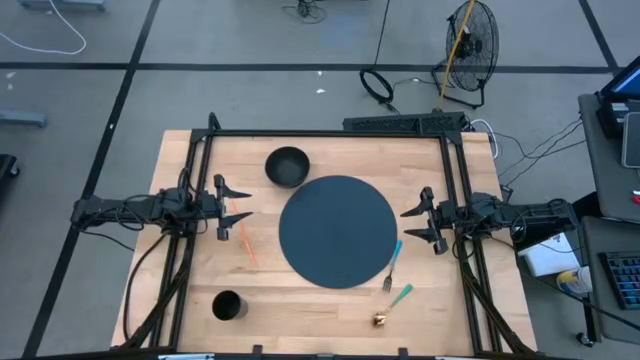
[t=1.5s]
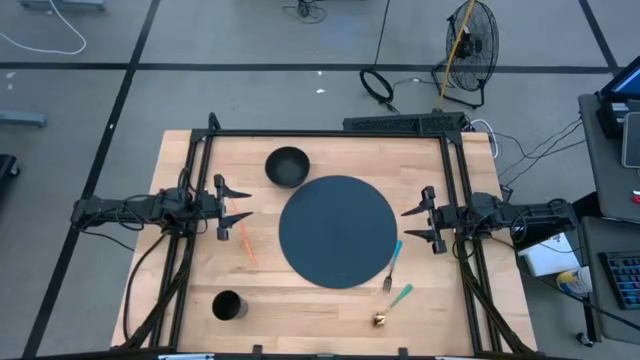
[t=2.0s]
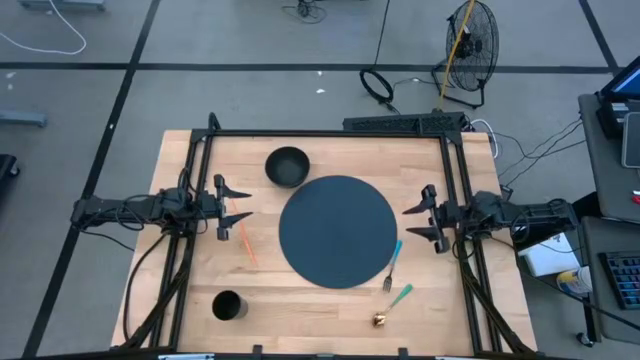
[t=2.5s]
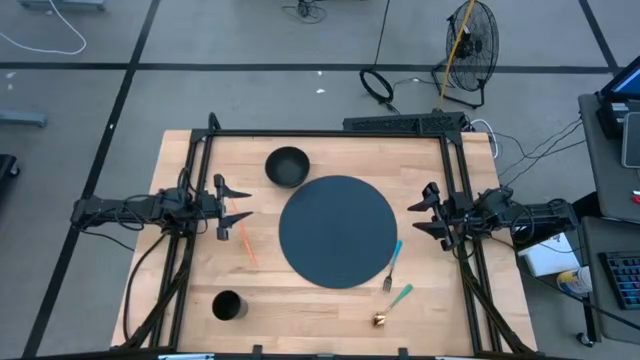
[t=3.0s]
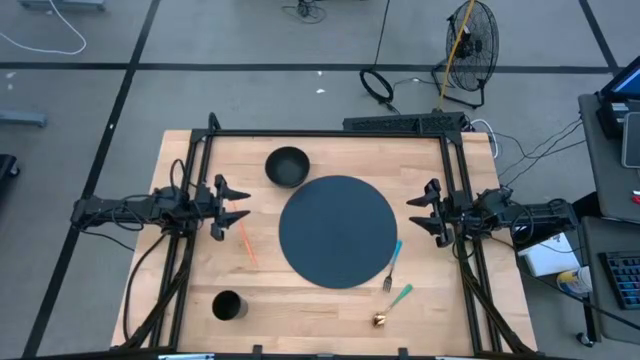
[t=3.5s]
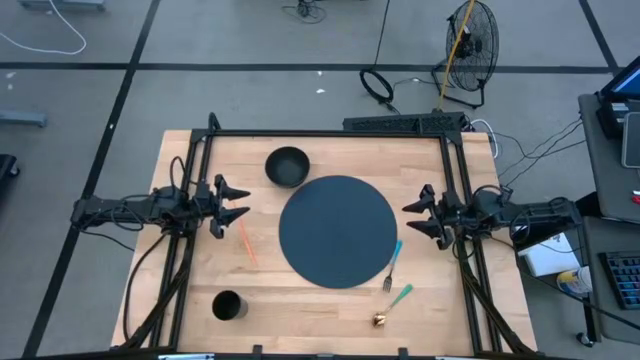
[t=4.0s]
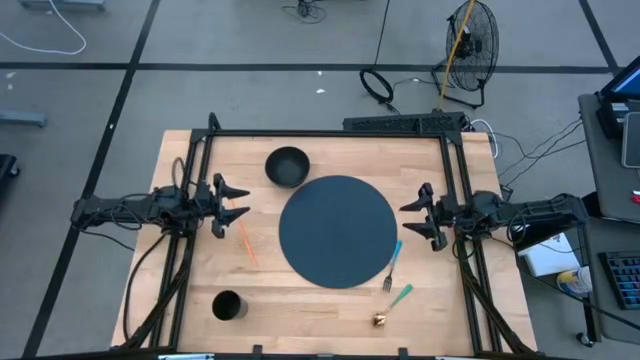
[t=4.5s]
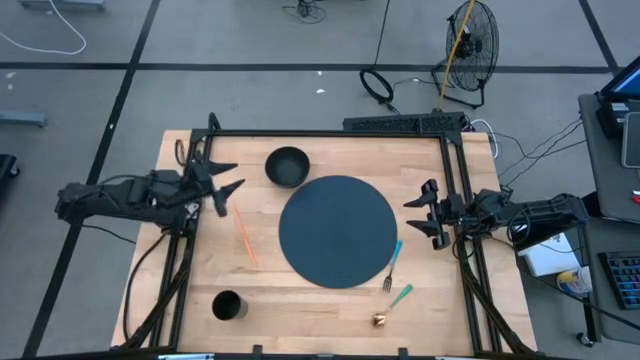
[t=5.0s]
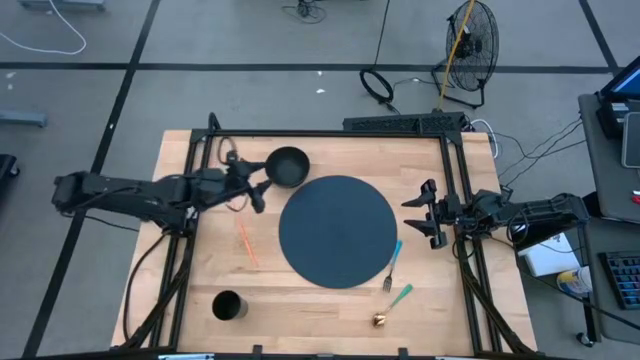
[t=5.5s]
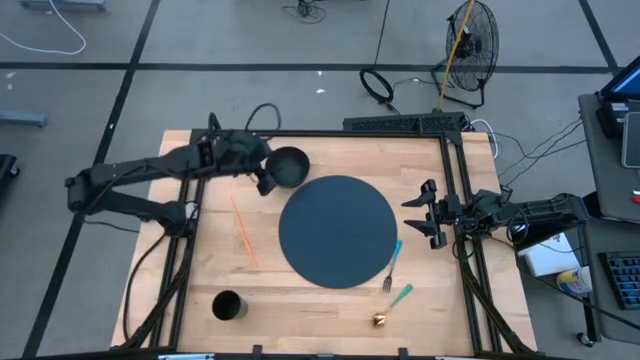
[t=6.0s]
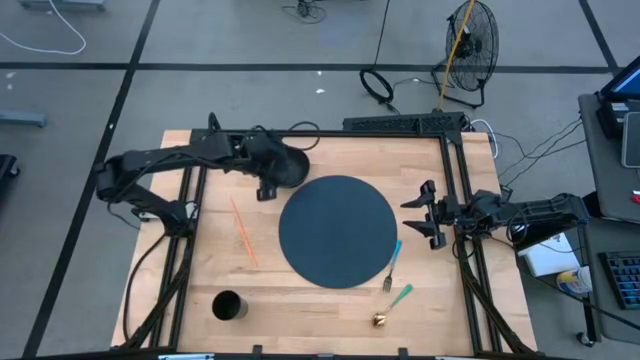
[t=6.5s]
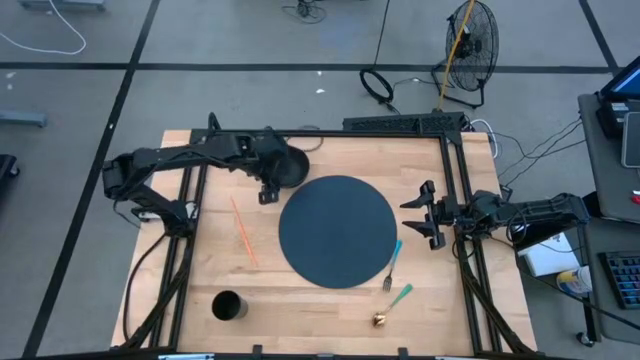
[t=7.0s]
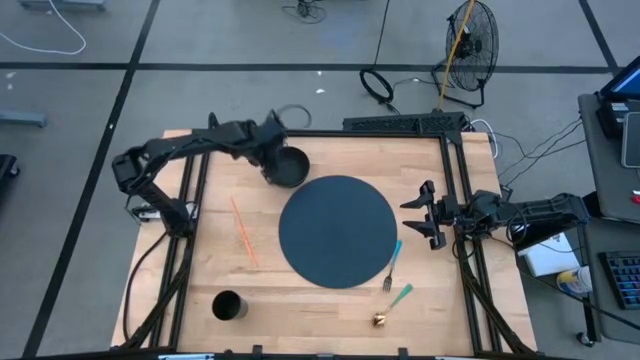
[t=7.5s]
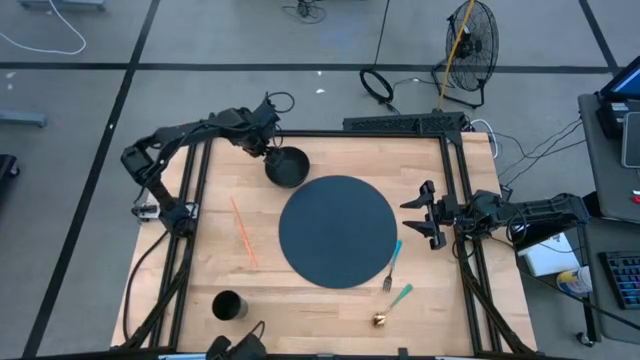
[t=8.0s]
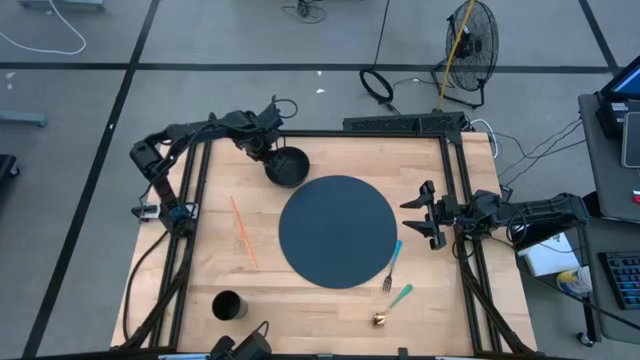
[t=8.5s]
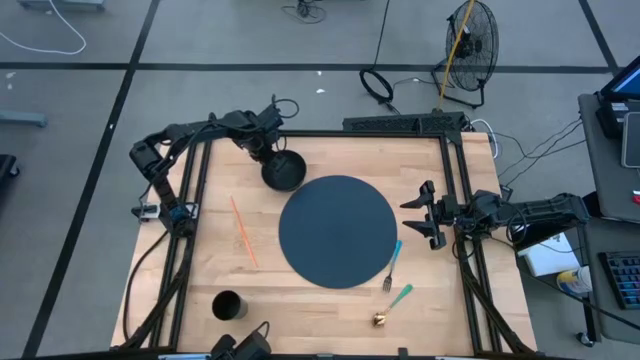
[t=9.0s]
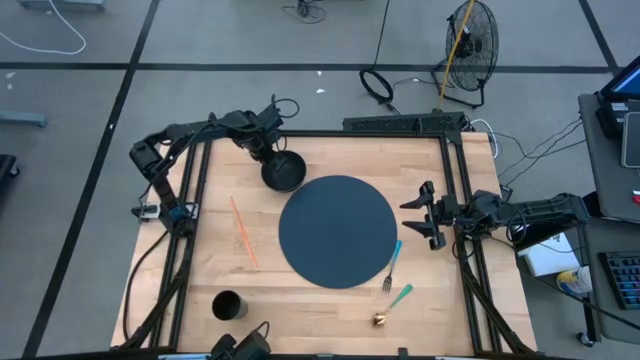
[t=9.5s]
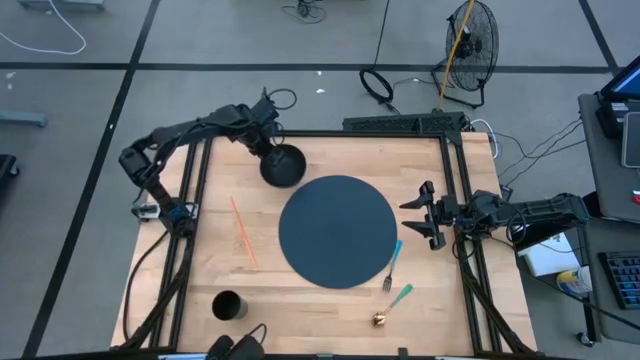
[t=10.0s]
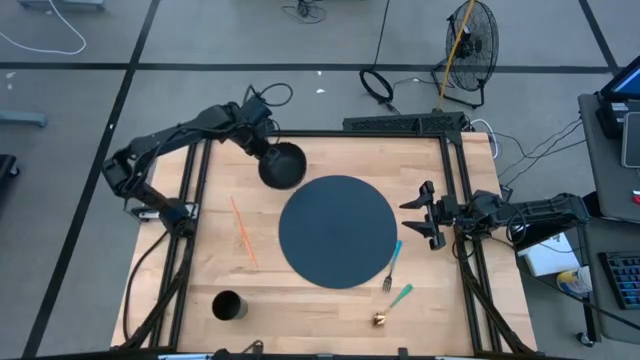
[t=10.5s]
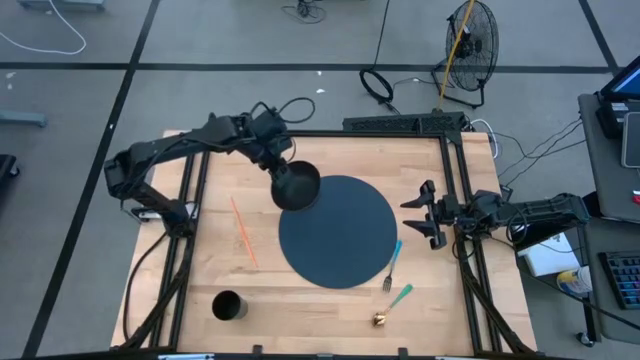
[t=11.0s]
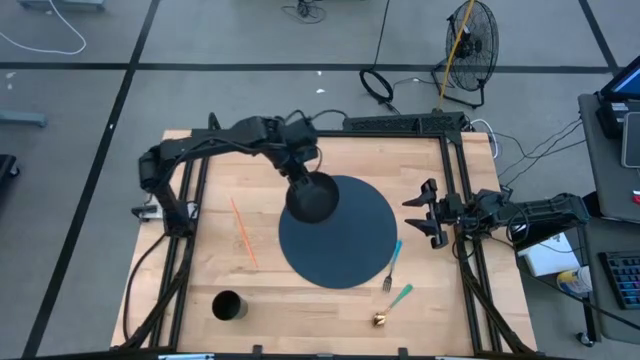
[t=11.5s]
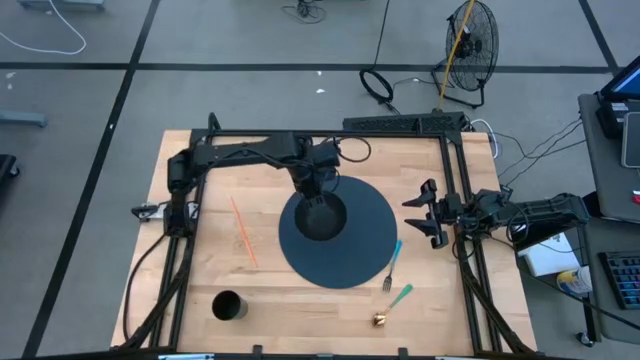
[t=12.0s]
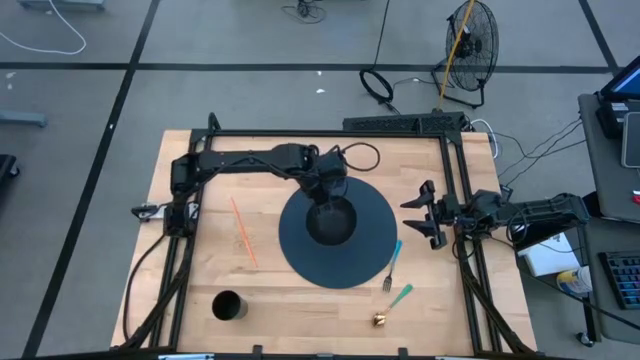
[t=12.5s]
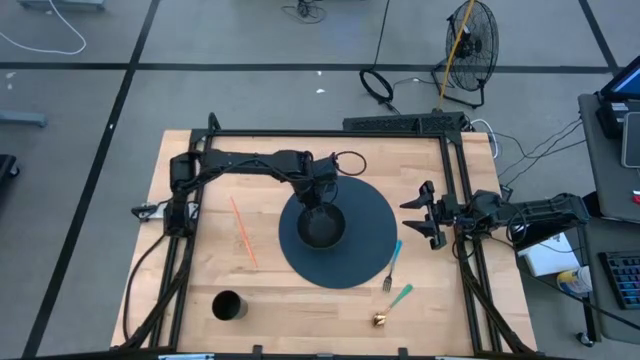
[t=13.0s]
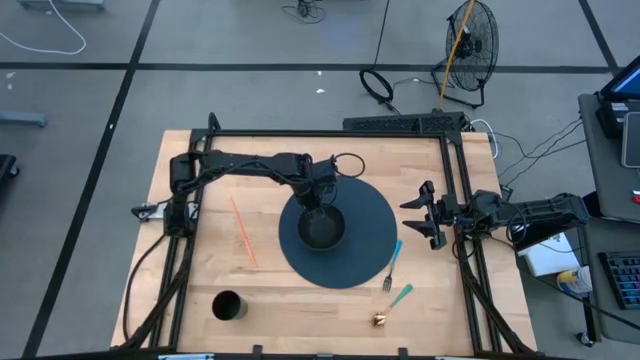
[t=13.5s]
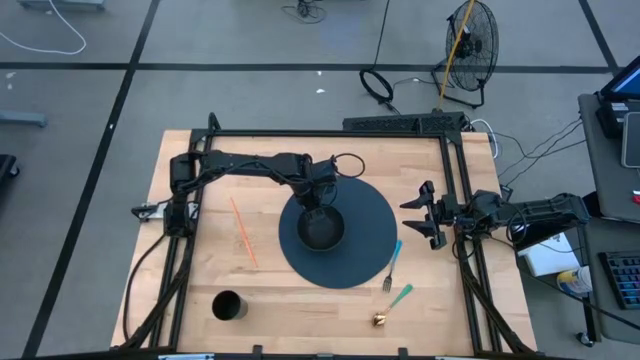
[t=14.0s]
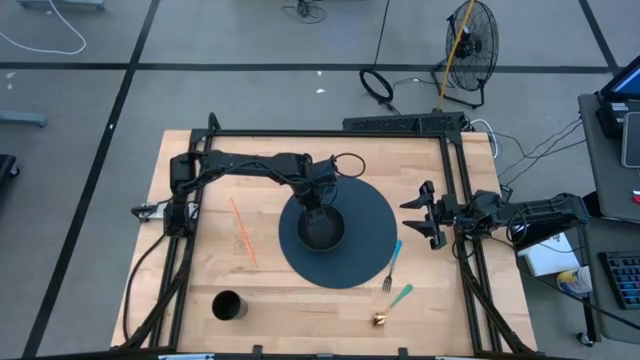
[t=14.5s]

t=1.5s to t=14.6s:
Task: Pick & Place Utensil
Put the black bowl on the blue table placemat

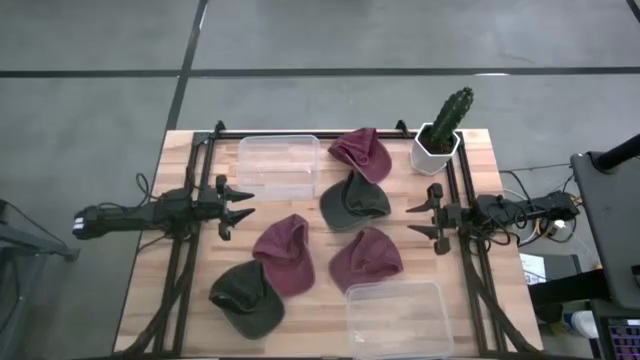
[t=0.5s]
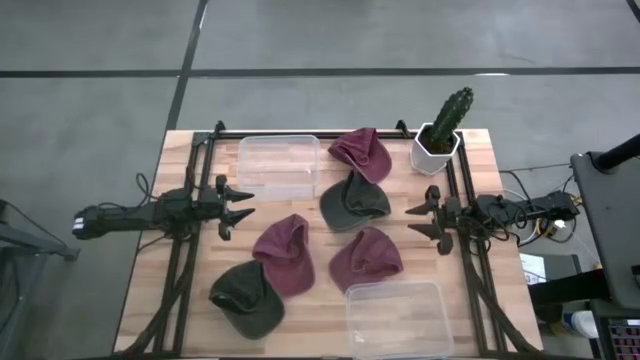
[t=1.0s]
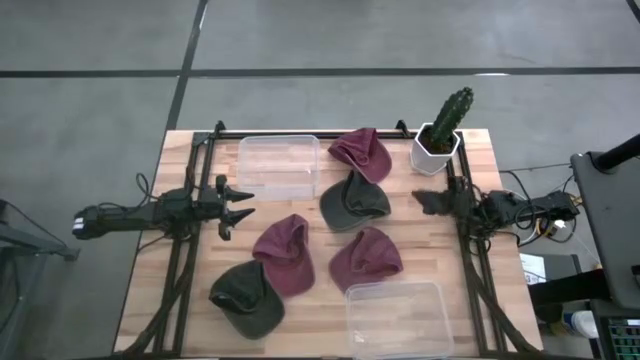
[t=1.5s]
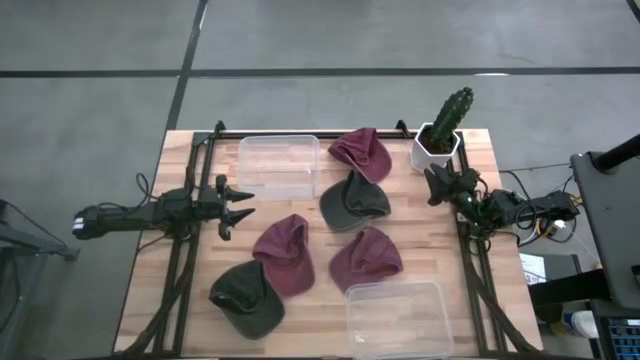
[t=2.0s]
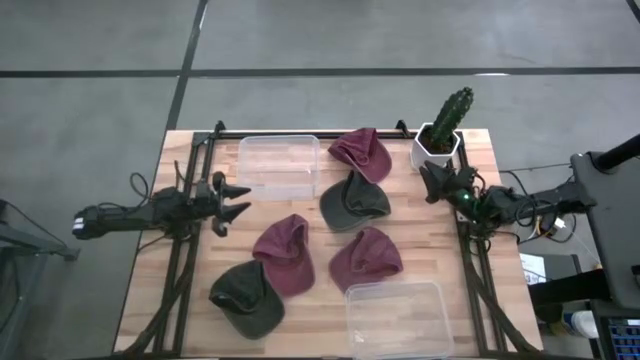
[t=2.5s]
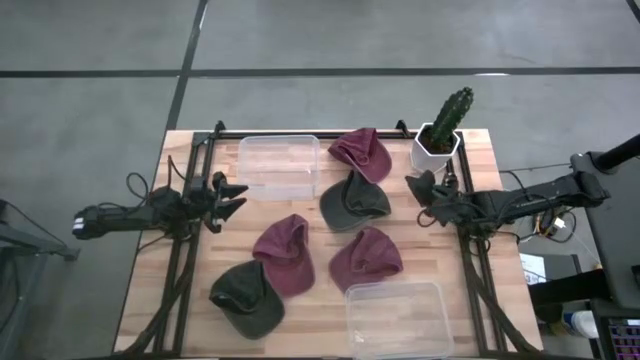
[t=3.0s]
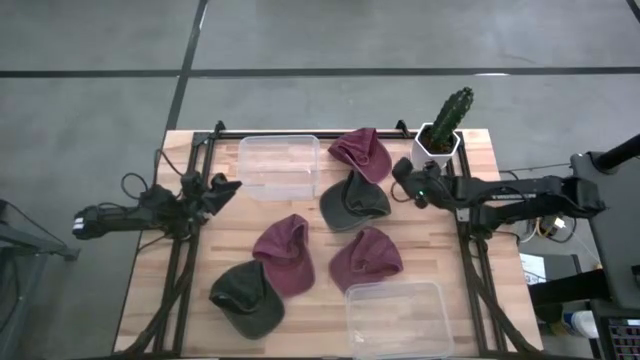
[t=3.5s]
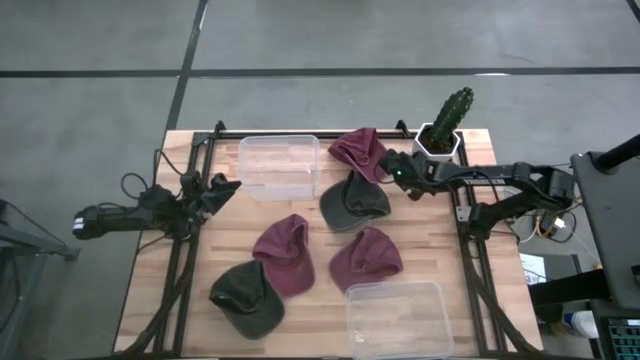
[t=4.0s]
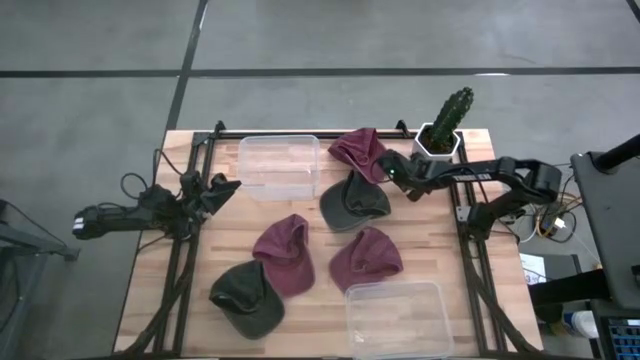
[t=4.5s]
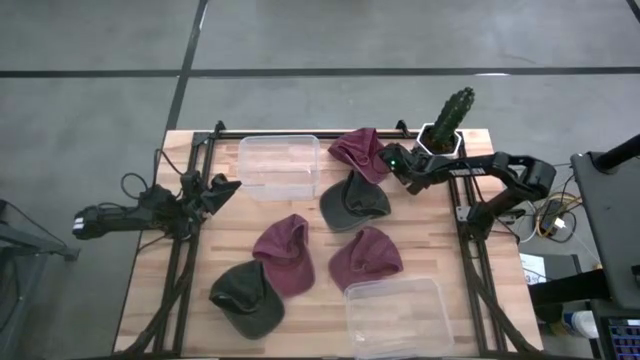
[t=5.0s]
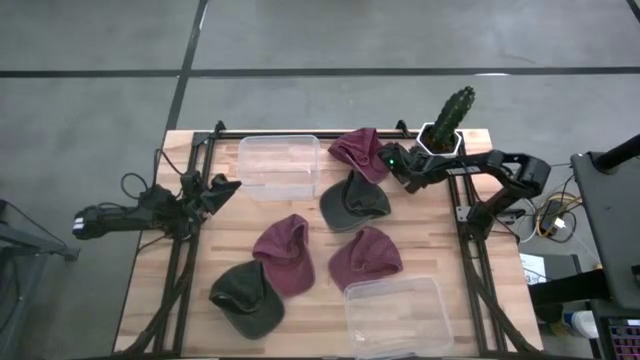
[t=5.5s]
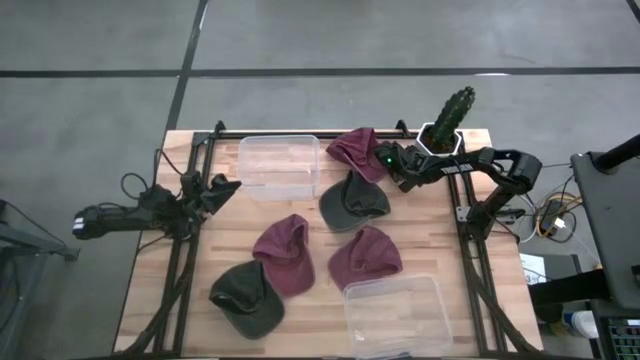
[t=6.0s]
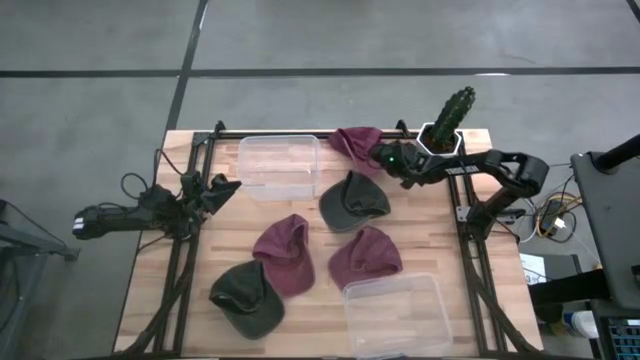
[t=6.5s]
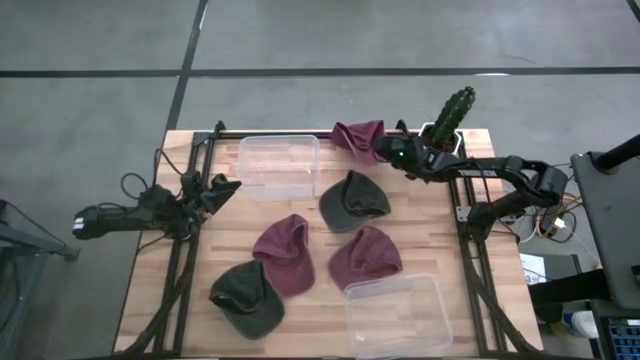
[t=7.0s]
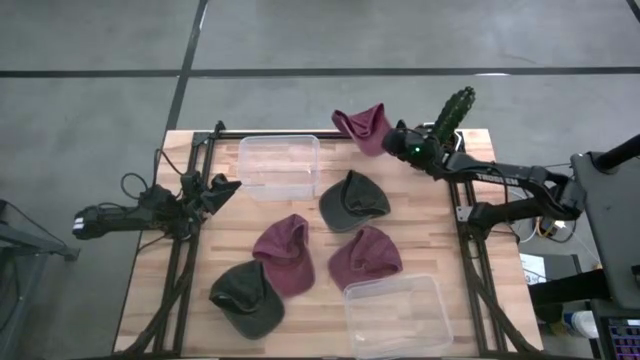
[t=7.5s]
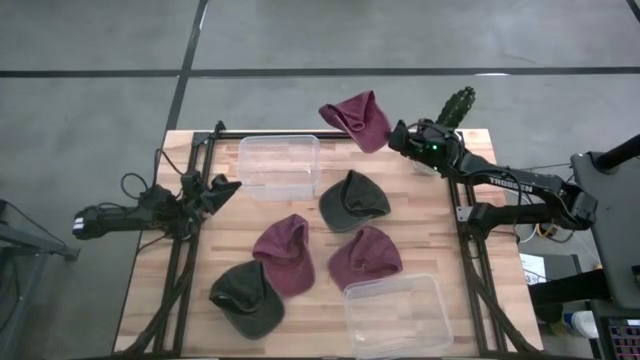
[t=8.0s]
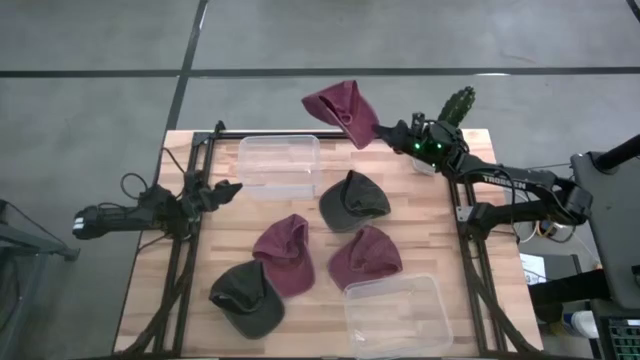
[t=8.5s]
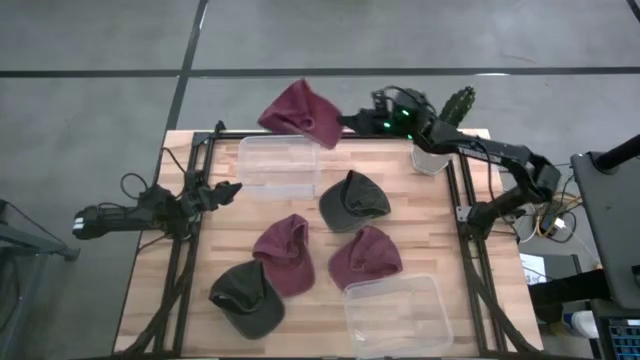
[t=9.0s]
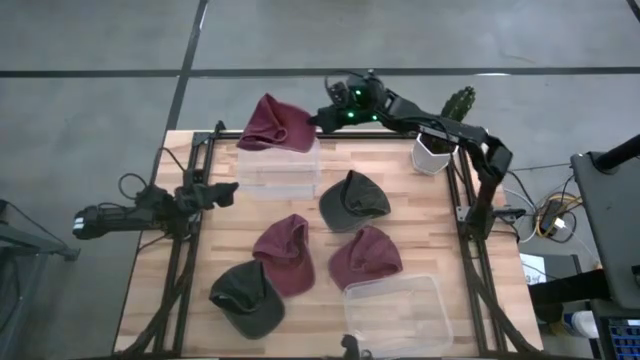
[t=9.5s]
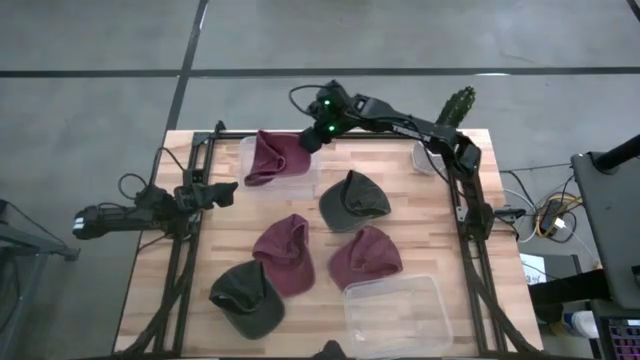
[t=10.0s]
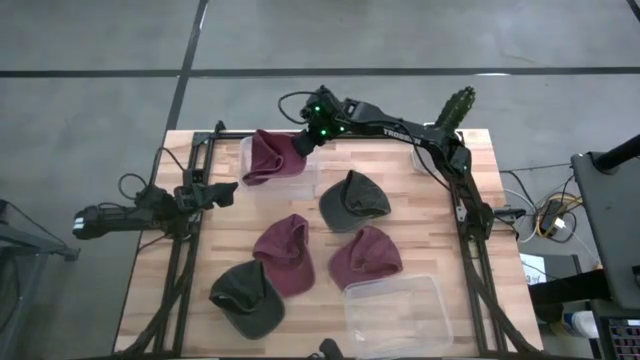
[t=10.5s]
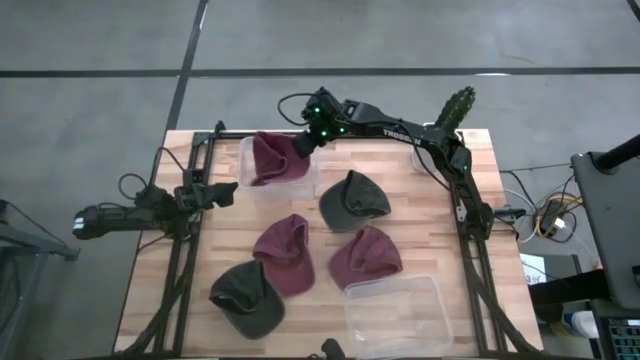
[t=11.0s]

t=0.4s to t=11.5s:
Task: Pick and place caps into container
Put the top red cap into the top transparent container
